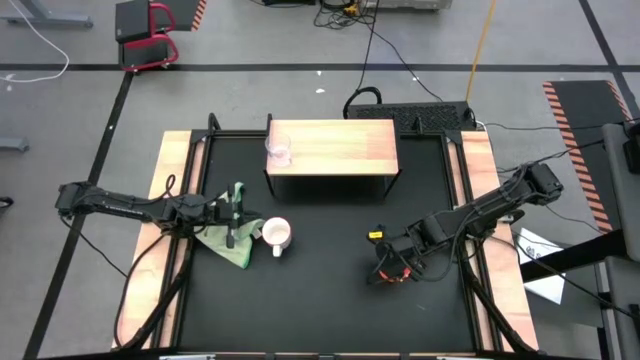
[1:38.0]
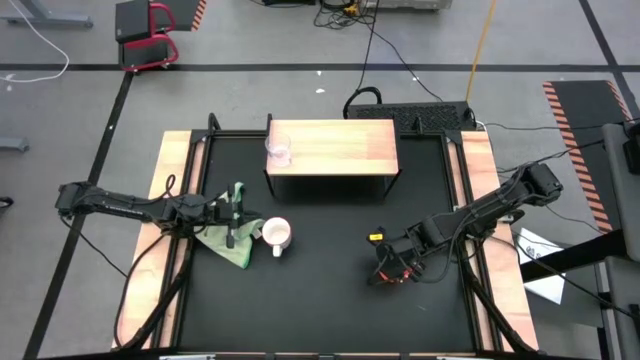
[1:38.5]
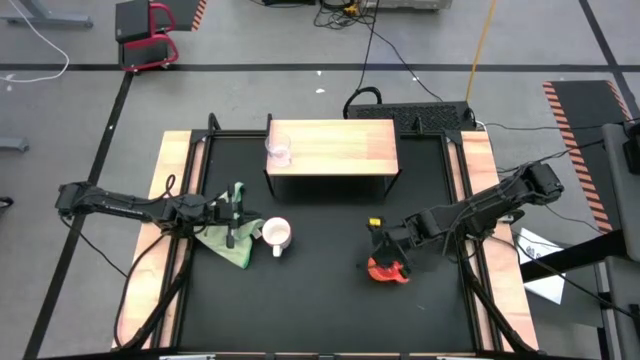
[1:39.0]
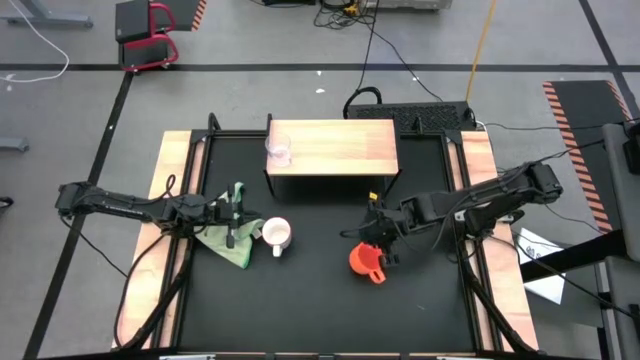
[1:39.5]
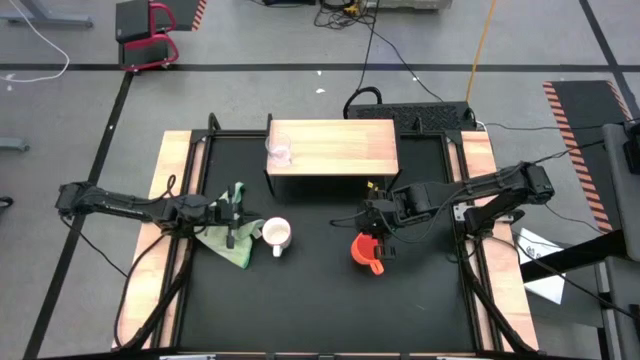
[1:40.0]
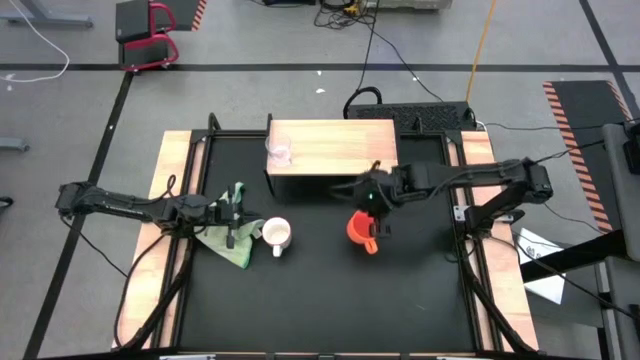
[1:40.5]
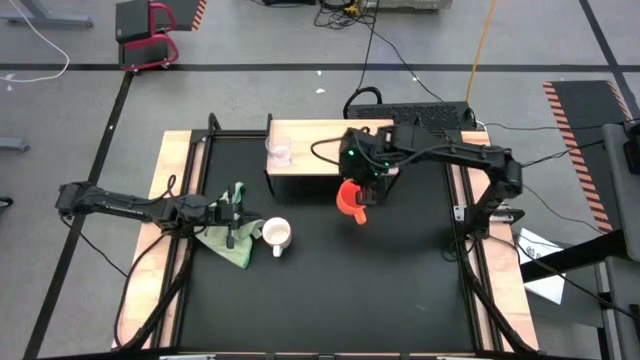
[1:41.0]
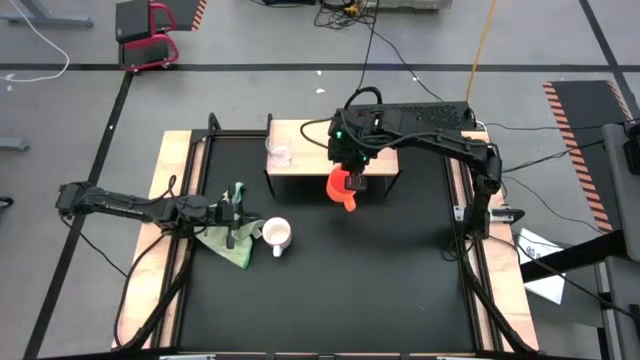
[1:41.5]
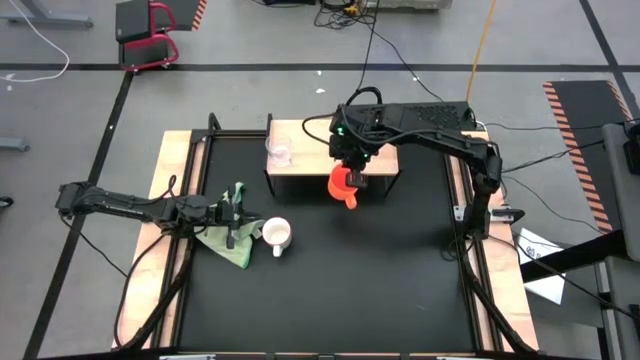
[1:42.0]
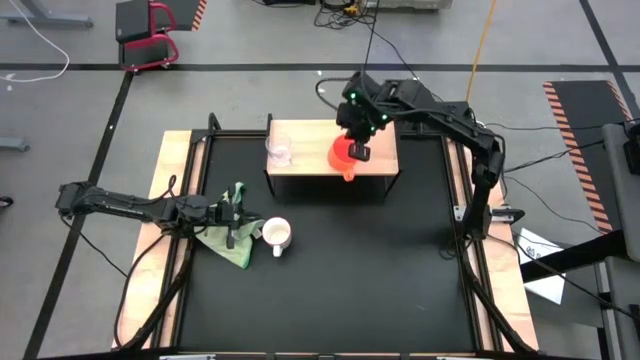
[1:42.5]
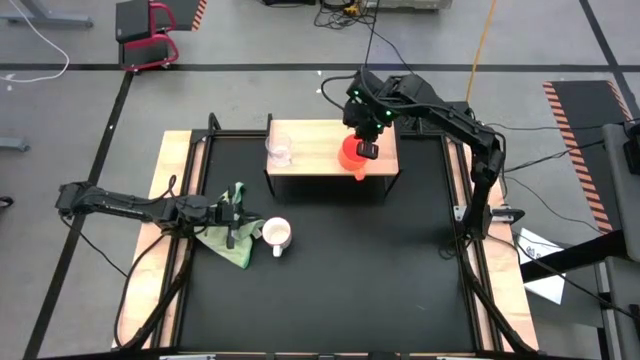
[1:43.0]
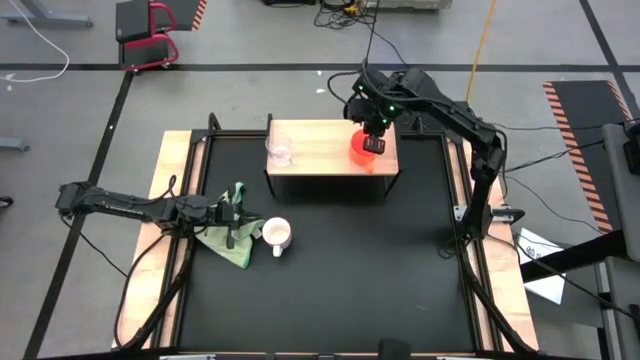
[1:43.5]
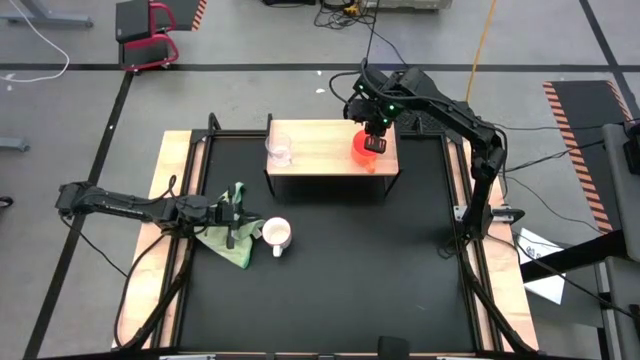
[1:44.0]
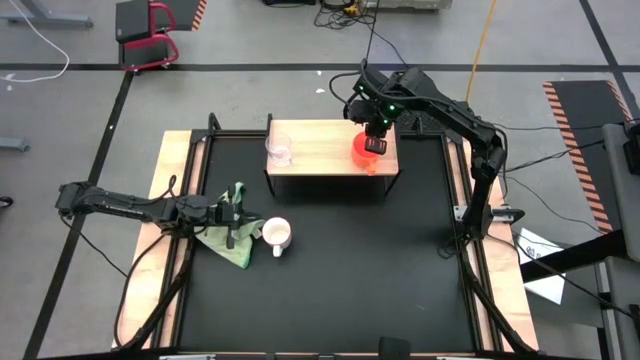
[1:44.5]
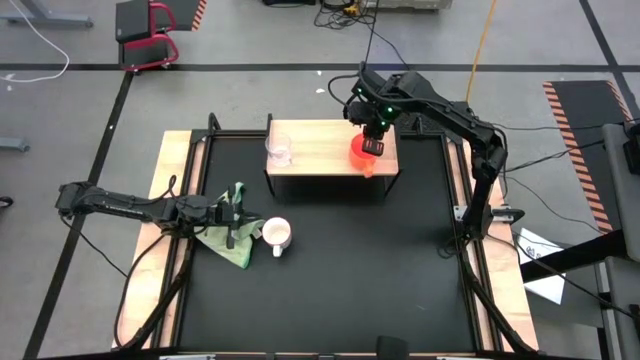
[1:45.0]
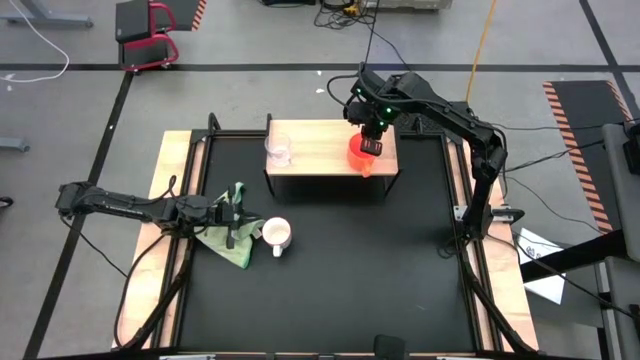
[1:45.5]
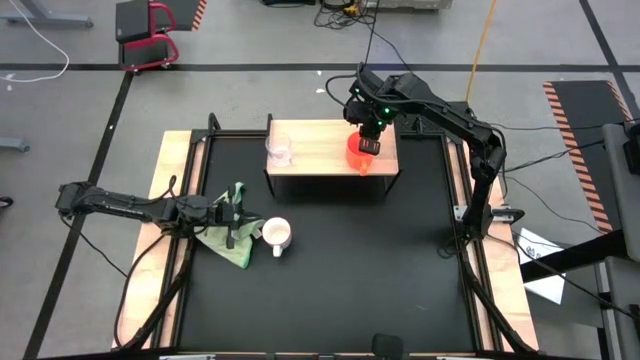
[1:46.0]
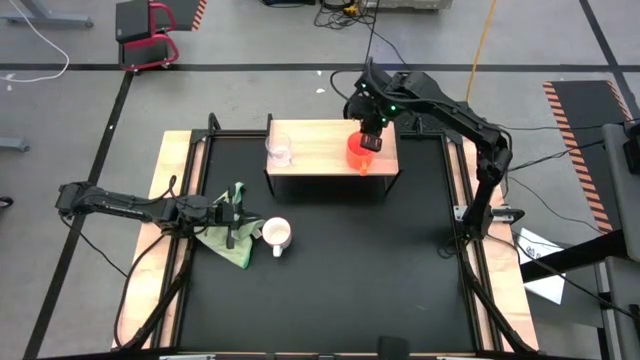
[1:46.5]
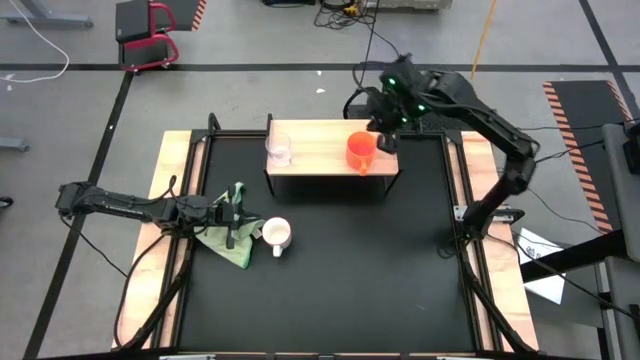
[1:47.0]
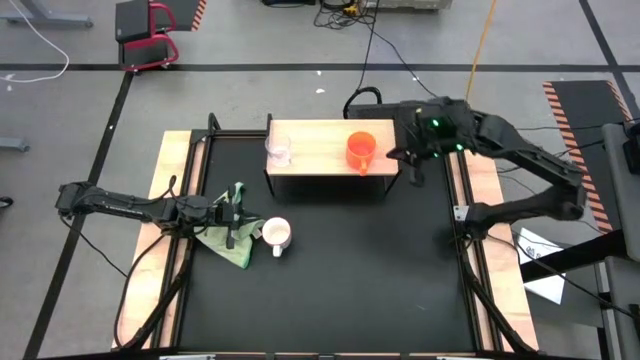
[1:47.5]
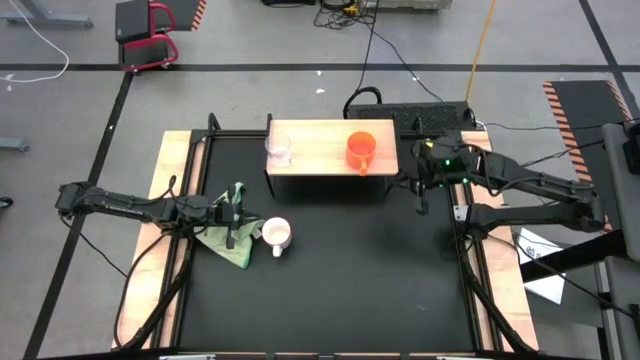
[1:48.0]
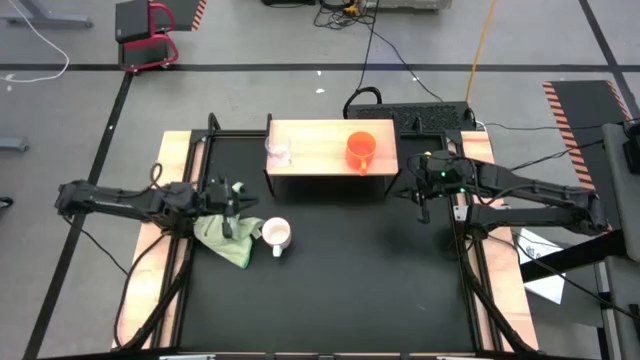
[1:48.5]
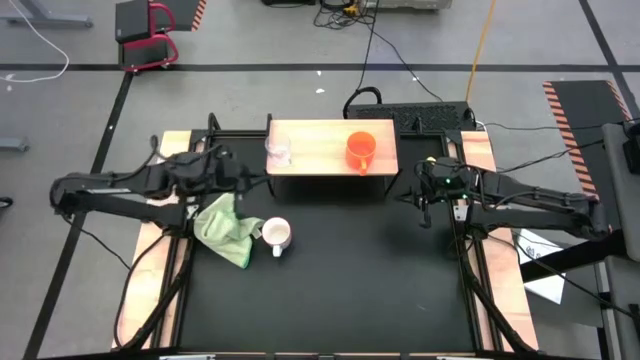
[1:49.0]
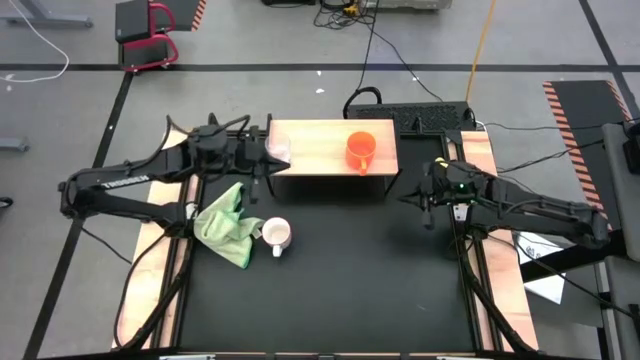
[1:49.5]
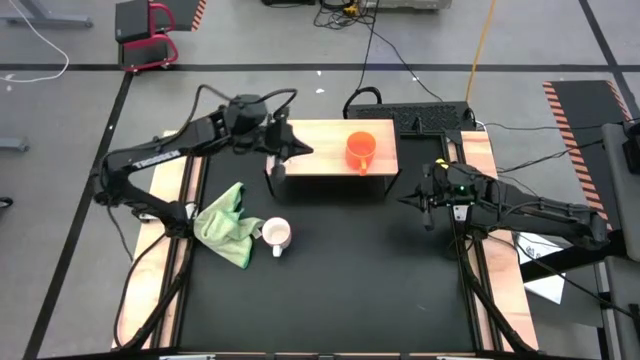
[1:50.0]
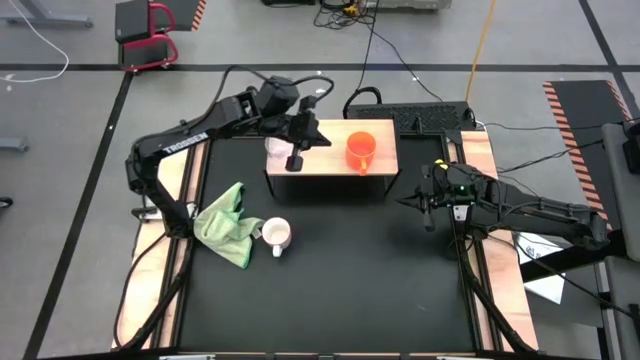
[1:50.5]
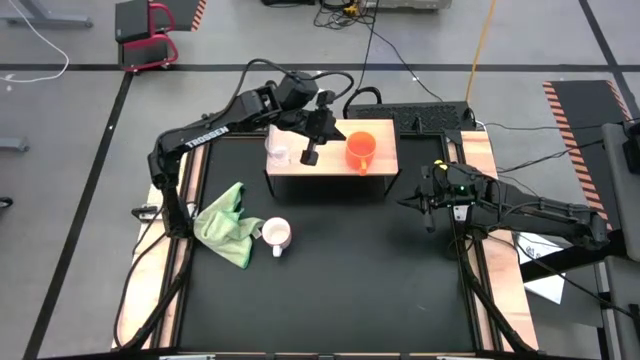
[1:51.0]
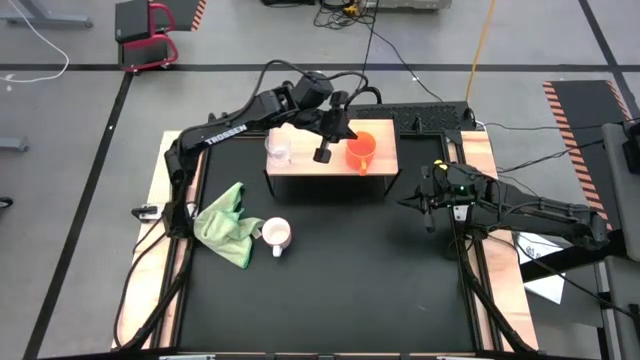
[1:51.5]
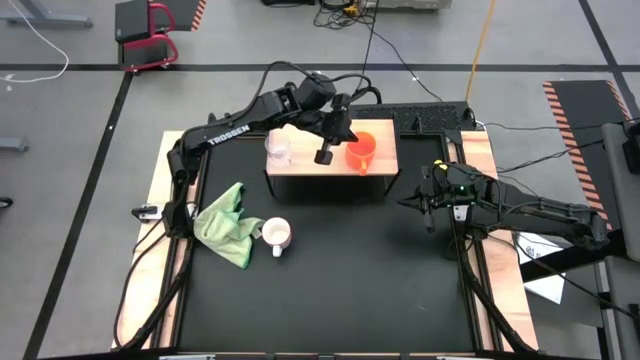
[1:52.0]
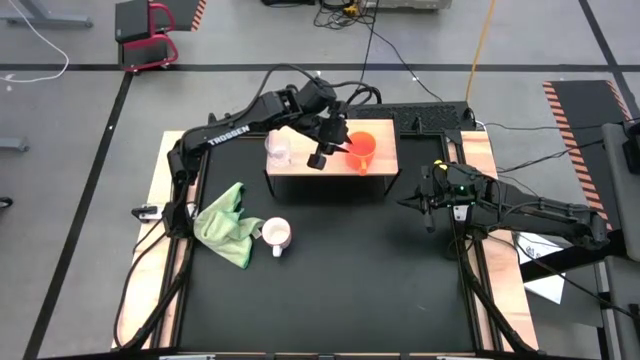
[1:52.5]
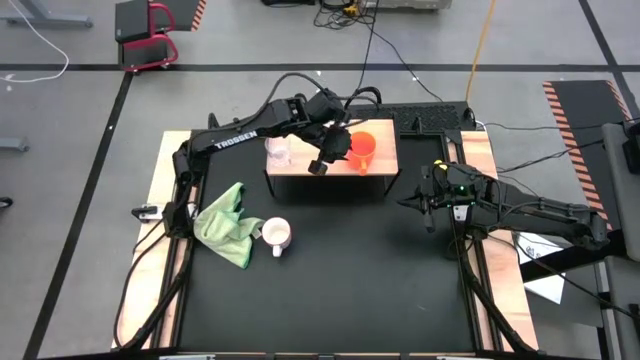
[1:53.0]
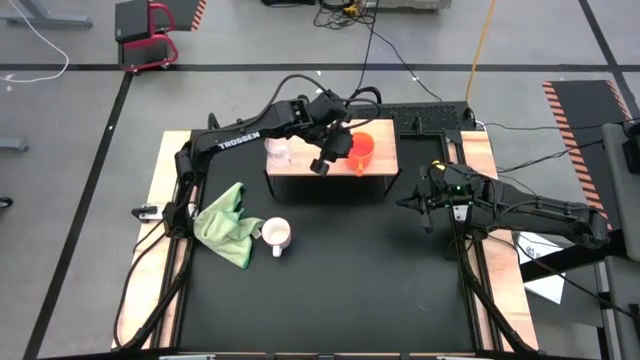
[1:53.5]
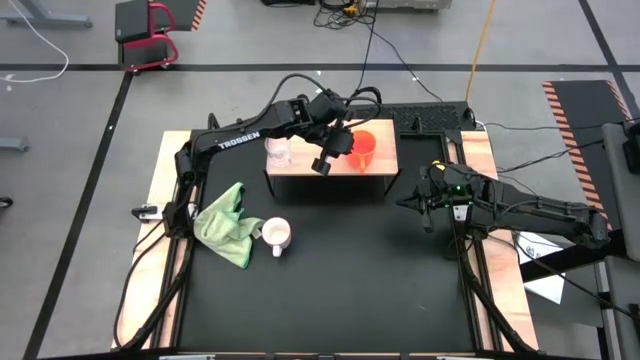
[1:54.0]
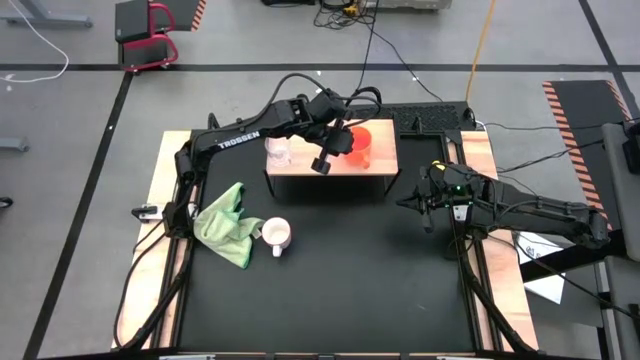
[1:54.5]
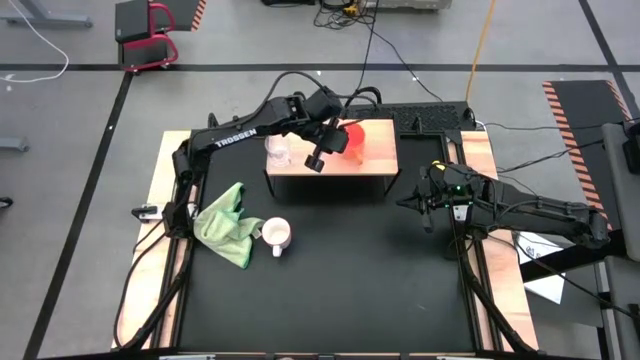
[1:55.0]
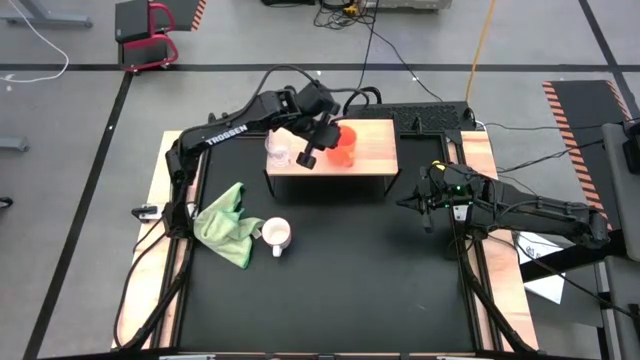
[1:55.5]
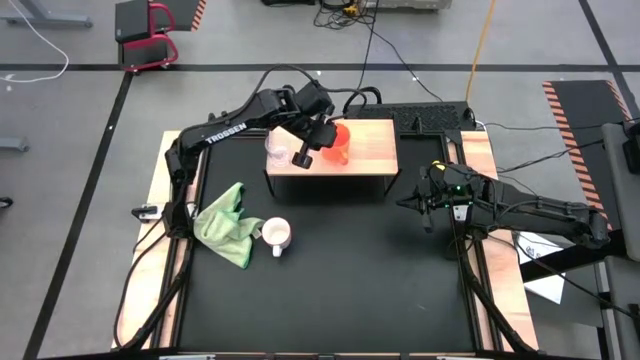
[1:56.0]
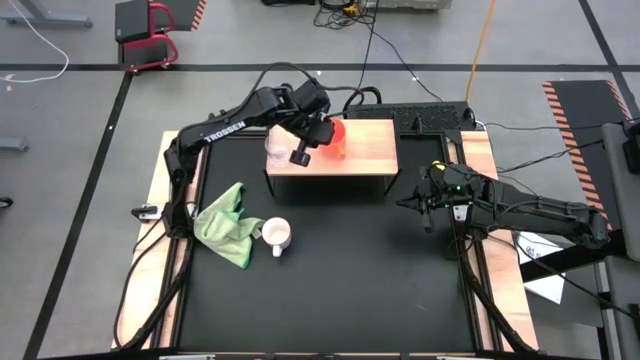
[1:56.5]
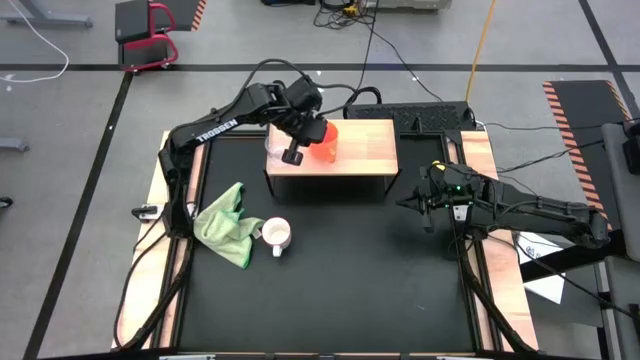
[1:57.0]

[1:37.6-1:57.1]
Task: Stack small to large cups/mugs on shelf
Put the orange mug on the shelf

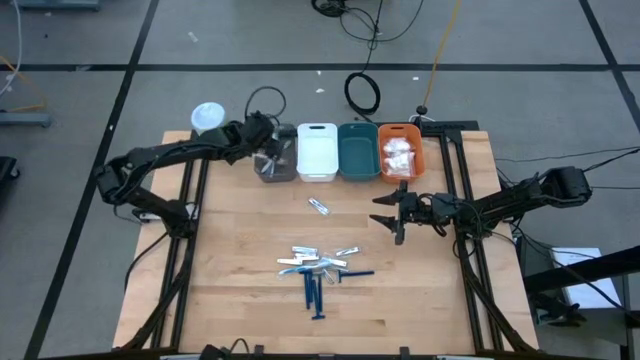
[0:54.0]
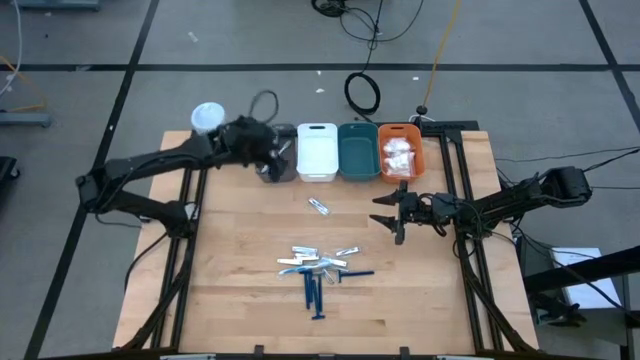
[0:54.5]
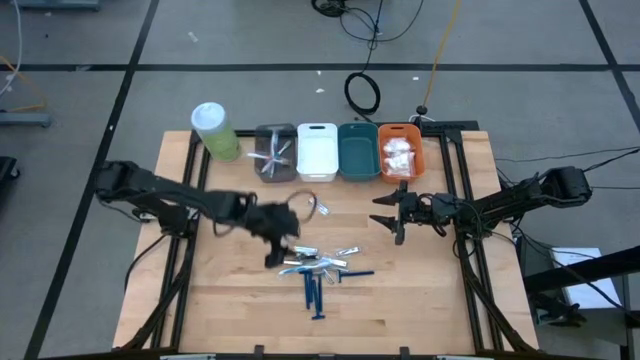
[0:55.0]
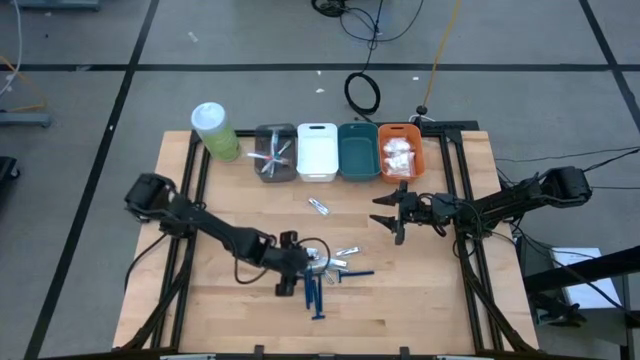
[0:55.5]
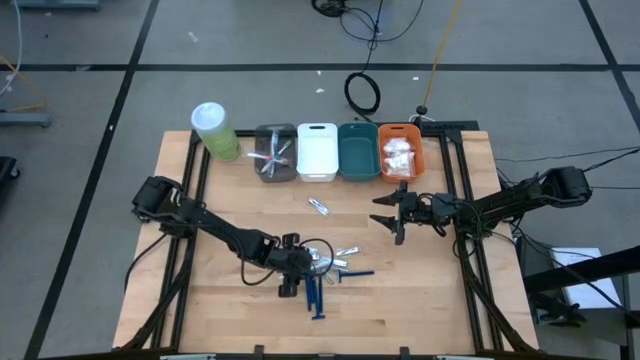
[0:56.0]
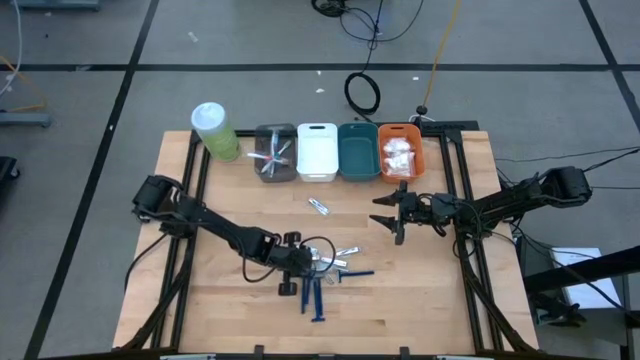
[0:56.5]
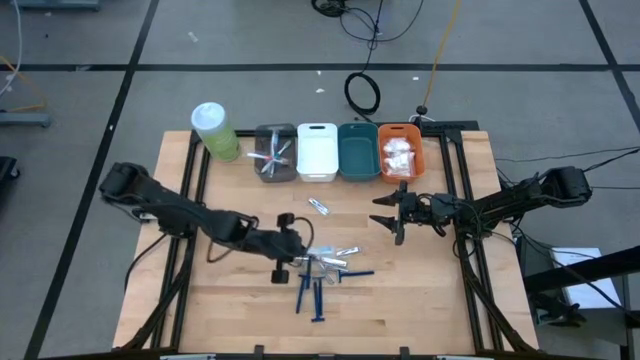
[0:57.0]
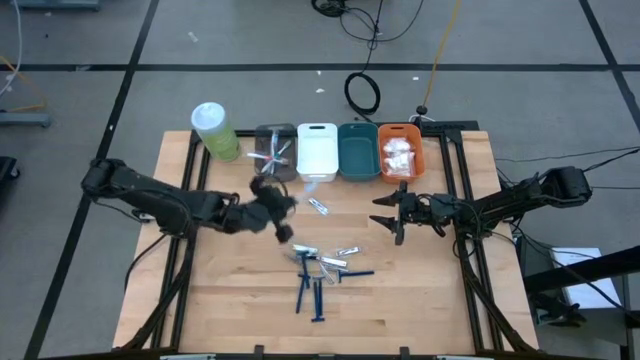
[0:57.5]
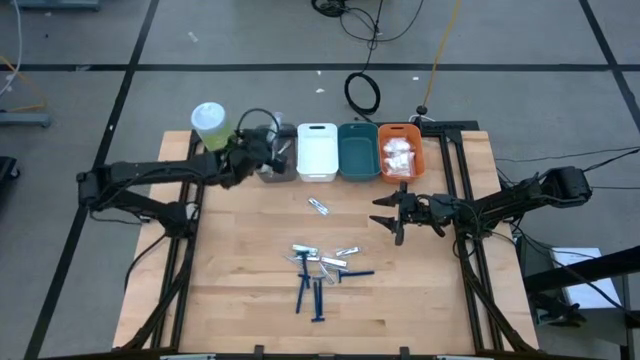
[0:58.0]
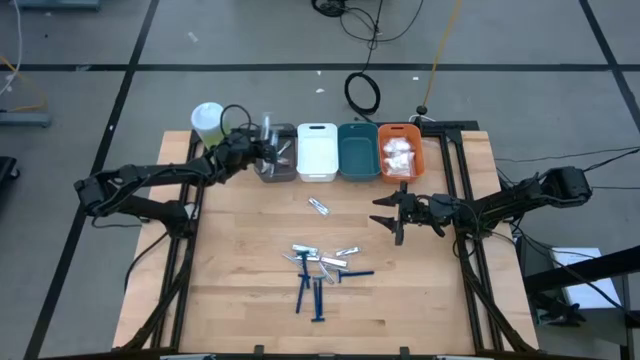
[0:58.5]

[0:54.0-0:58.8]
Task: Pick & Place Travel size toiletries
Put the blue toothbrush into the black bin
